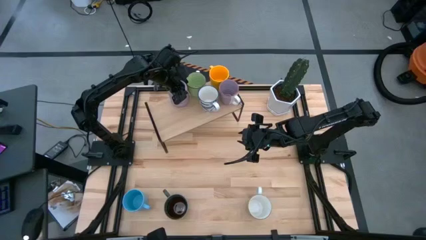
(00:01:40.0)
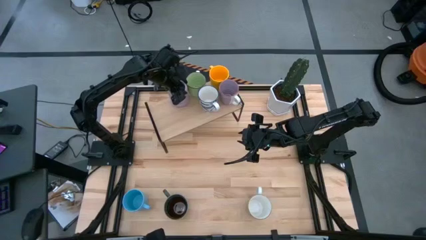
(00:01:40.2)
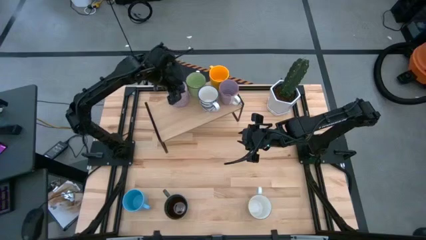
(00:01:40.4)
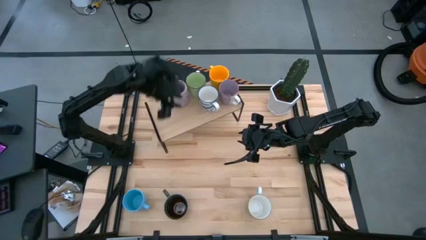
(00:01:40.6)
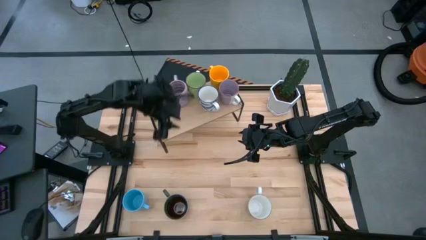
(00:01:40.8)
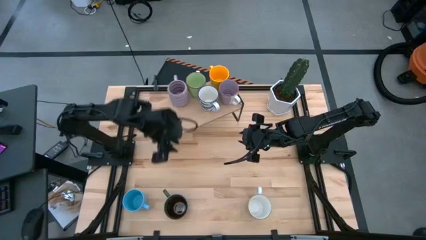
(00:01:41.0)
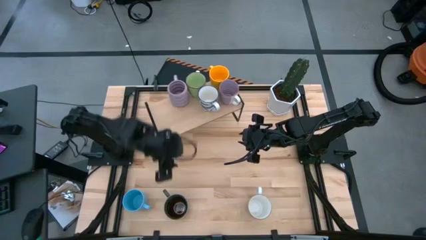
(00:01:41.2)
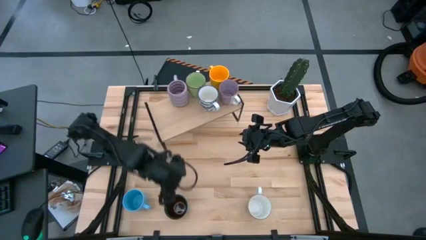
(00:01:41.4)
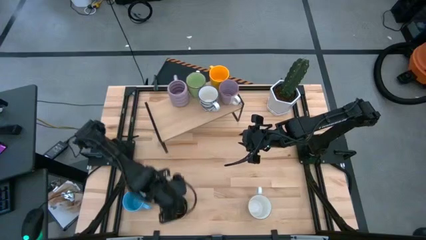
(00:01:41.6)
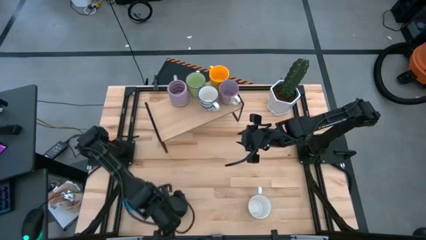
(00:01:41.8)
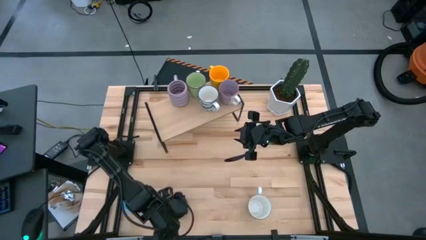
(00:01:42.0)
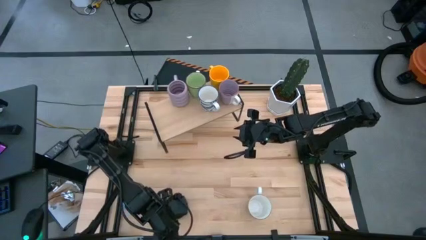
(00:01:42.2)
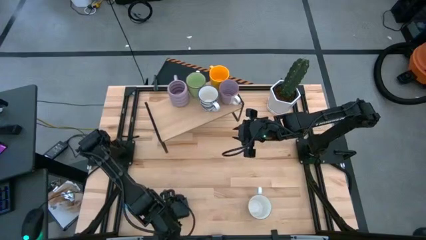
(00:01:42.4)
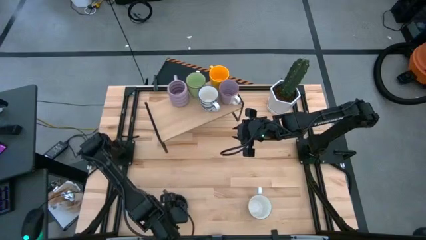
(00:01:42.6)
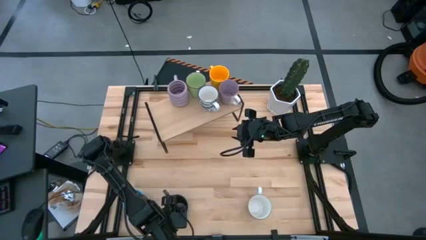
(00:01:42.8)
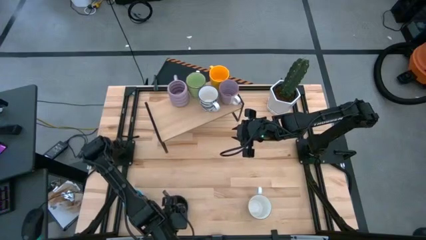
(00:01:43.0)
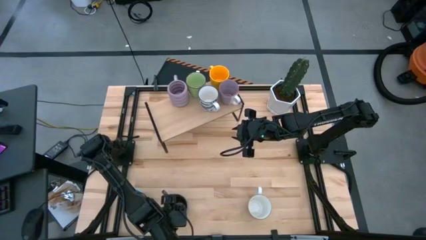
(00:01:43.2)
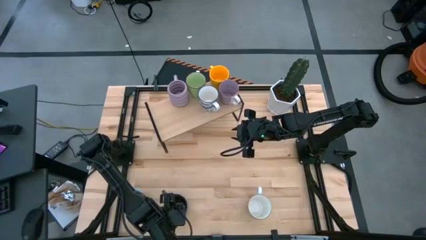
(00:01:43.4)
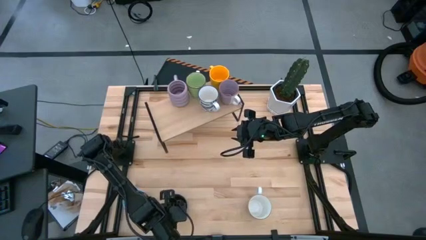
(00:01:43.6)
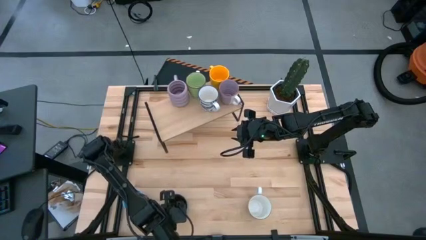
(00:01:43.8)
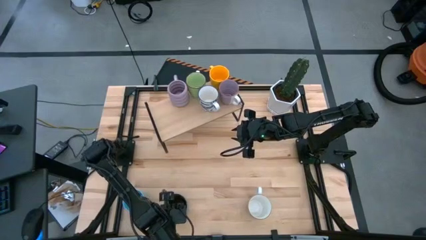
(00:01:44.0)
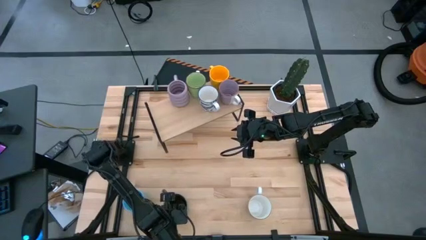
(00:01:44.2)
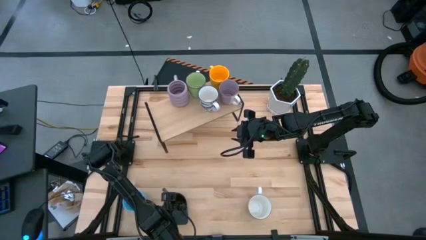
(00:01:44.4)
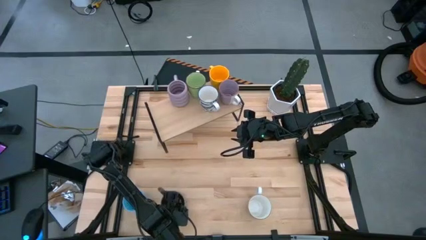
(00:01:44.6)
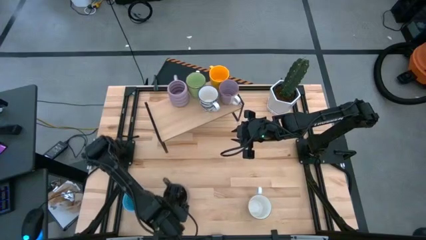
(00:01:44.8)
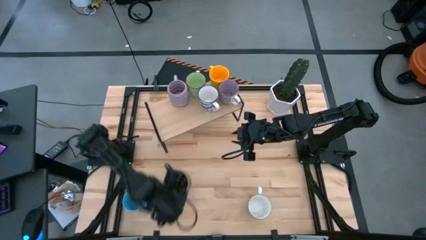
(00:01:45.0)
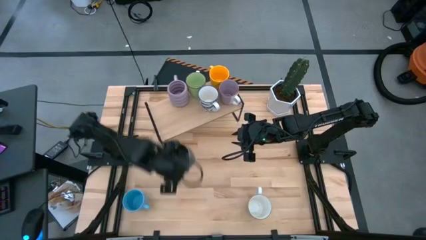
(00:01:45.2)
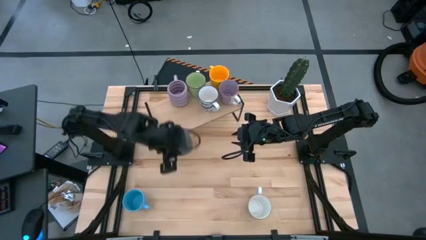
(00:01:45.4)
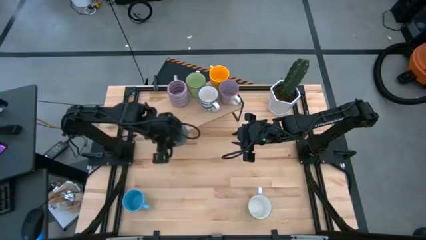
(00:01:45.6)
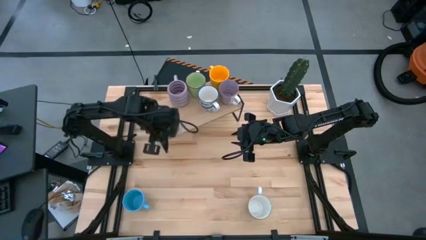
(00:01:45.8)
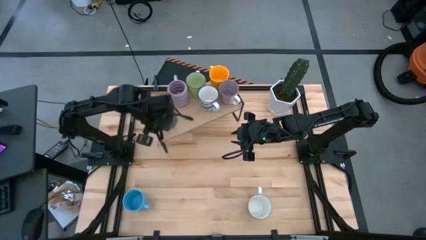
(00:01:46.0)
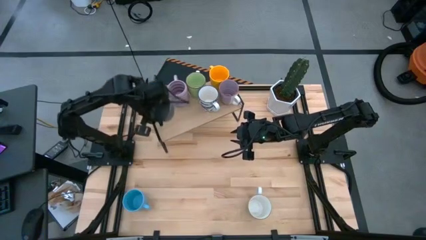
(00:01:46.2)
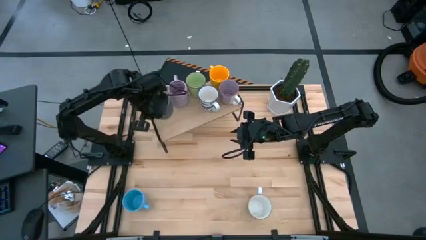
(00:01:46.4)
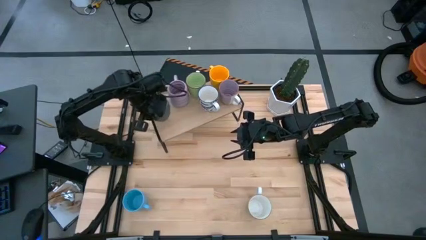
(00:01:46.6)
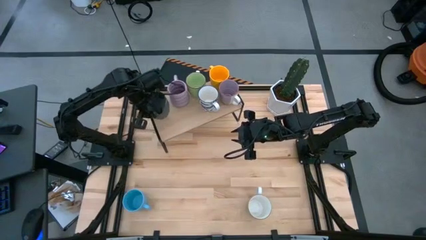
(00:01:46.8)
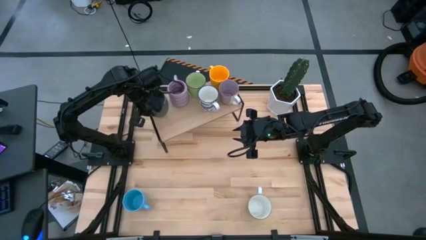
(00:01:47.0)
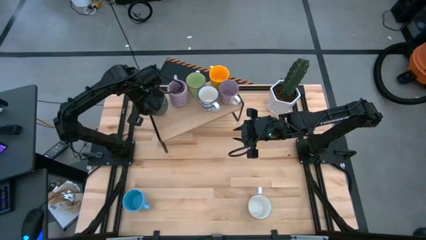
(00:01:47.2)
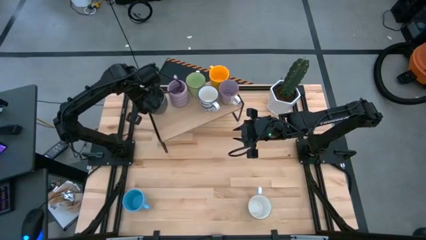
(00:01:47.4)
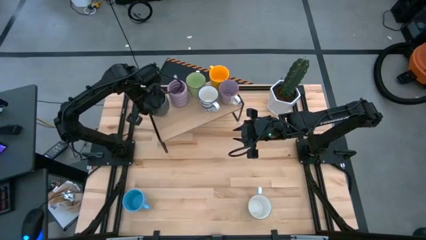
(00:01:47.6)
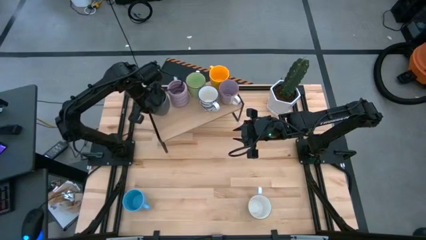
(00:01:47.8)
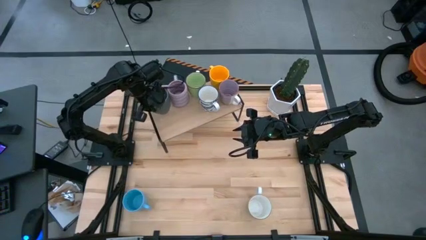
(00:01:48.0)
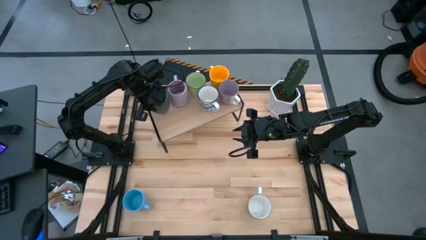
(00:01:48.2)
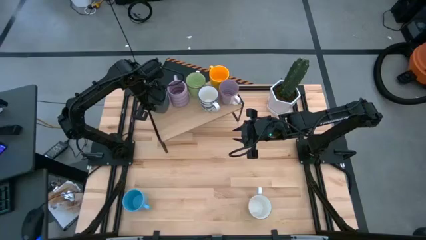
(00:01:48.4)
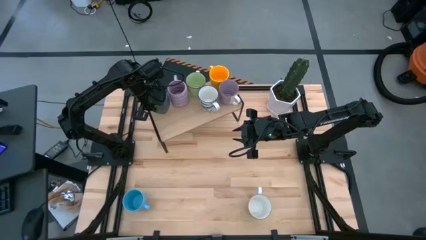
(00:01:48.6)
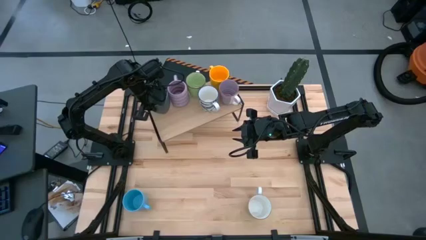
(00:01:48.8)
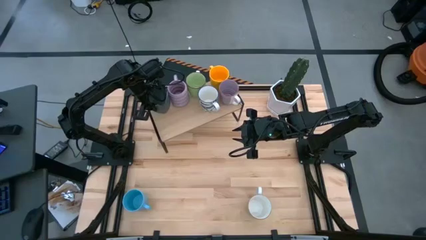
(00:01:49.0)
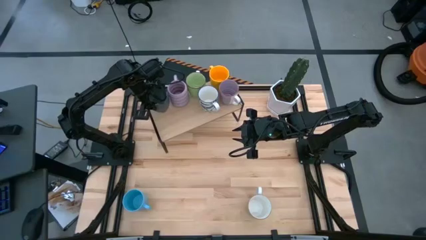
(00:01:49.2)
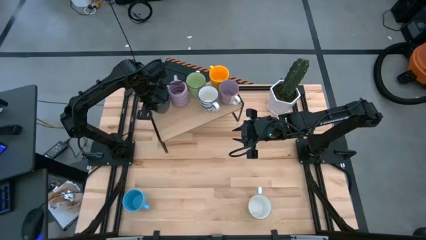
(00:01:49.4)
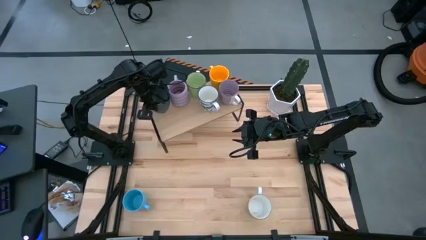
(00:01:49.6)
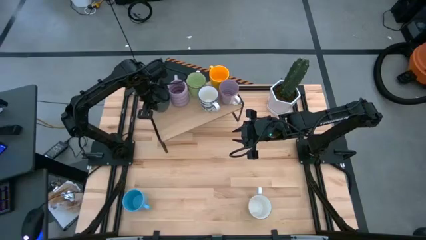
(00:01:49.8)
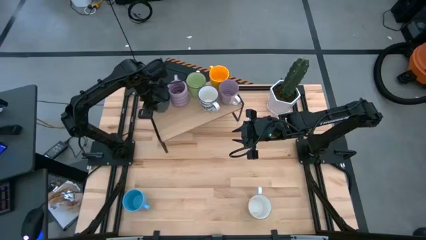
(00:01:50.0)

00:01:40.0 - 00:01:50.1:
Task: Place coffee mugs
Put the dark green mug on the shelf

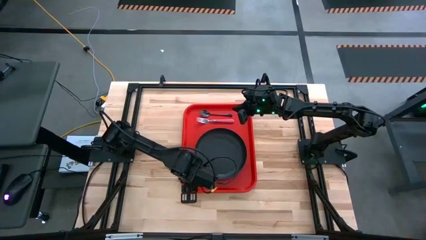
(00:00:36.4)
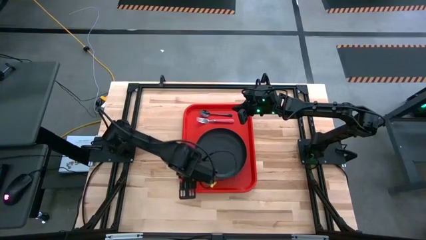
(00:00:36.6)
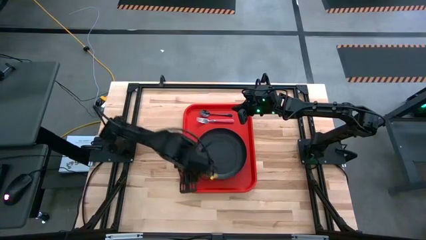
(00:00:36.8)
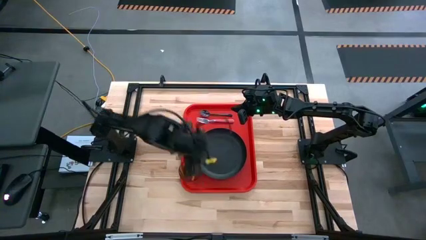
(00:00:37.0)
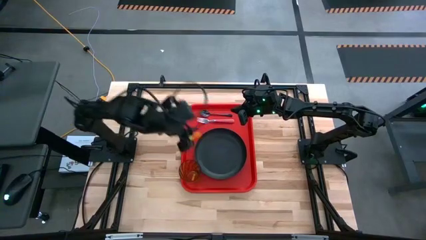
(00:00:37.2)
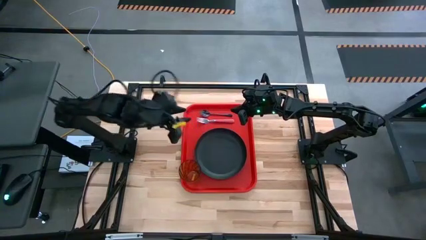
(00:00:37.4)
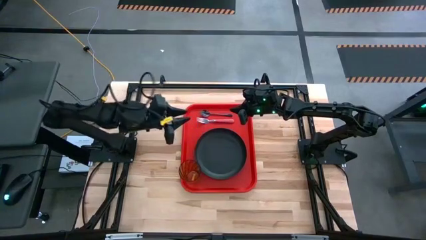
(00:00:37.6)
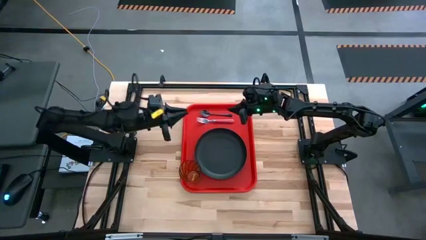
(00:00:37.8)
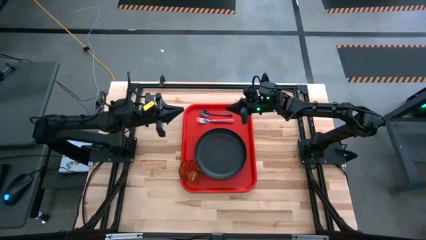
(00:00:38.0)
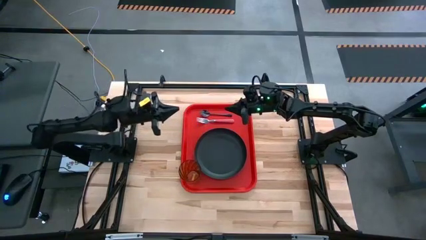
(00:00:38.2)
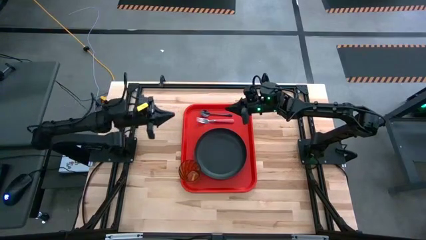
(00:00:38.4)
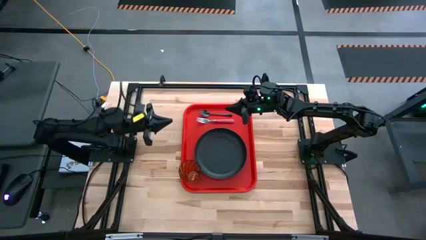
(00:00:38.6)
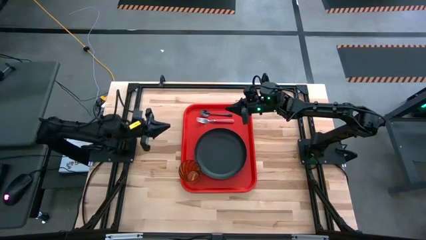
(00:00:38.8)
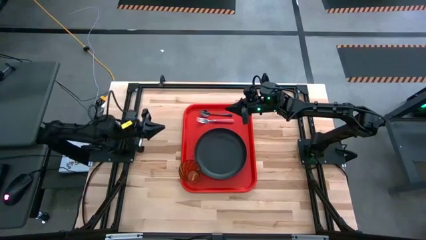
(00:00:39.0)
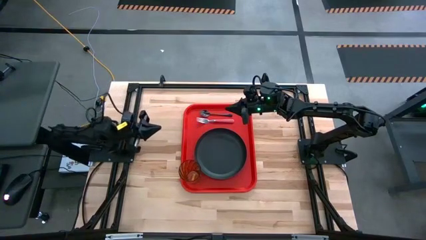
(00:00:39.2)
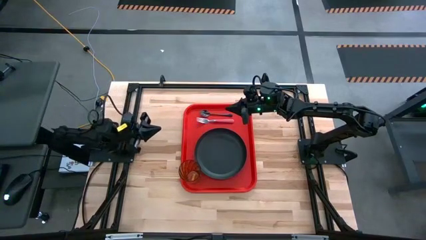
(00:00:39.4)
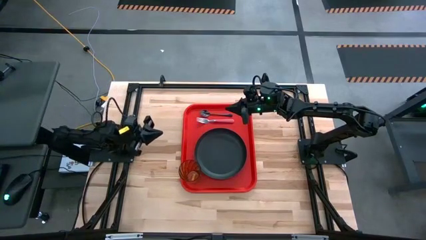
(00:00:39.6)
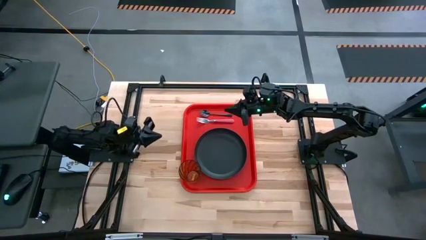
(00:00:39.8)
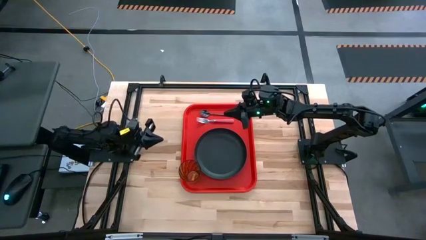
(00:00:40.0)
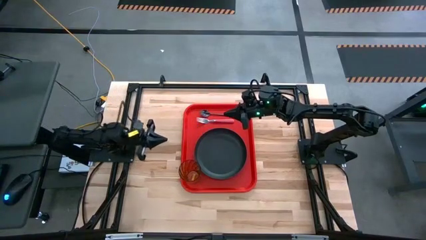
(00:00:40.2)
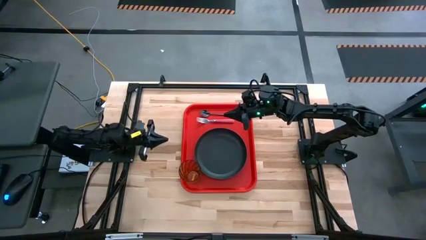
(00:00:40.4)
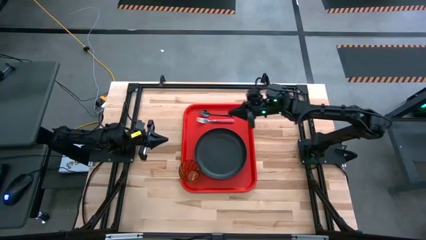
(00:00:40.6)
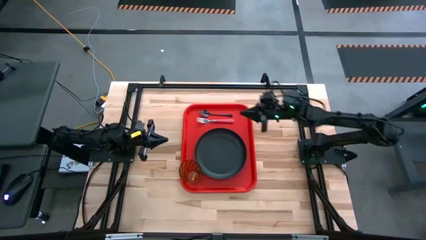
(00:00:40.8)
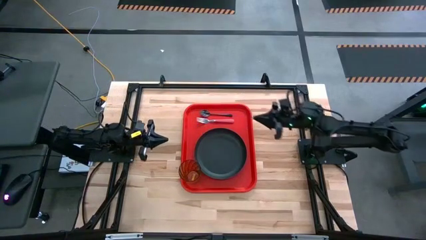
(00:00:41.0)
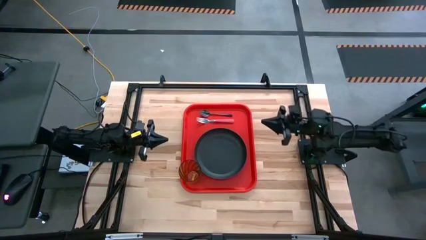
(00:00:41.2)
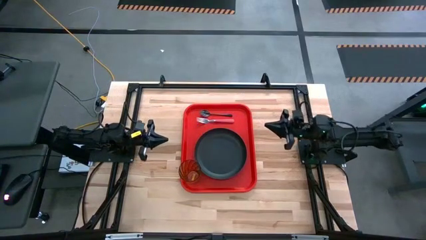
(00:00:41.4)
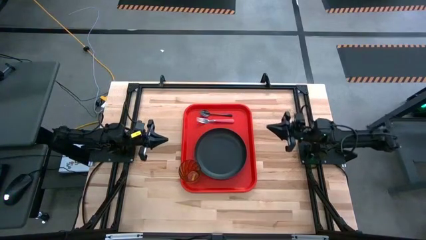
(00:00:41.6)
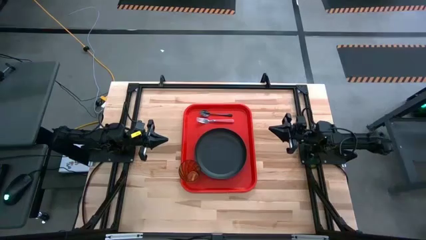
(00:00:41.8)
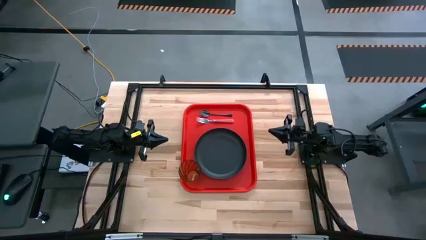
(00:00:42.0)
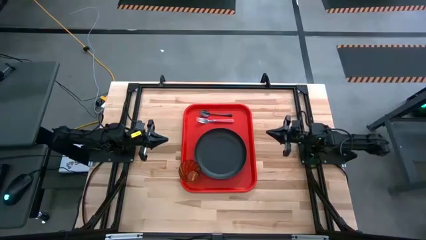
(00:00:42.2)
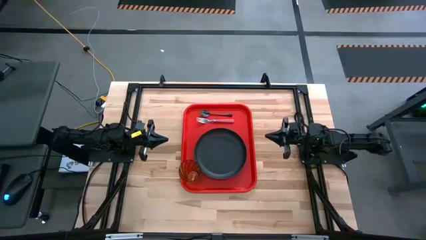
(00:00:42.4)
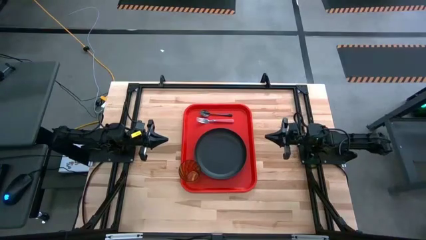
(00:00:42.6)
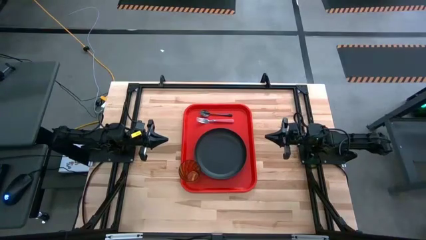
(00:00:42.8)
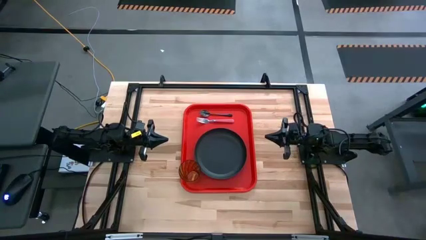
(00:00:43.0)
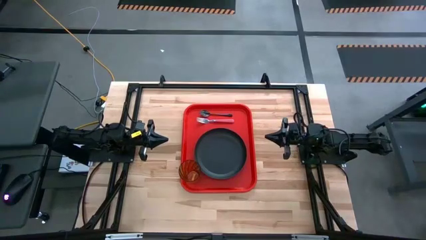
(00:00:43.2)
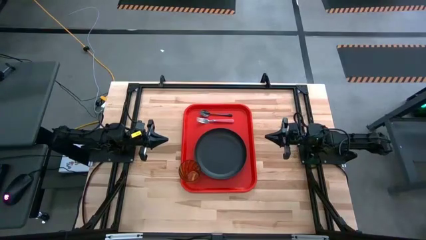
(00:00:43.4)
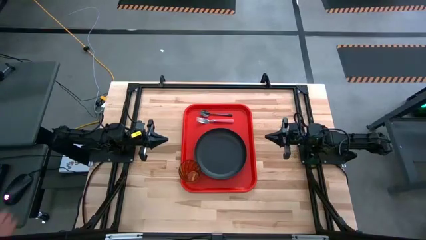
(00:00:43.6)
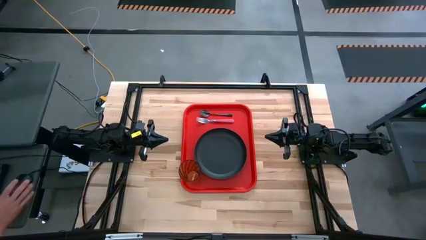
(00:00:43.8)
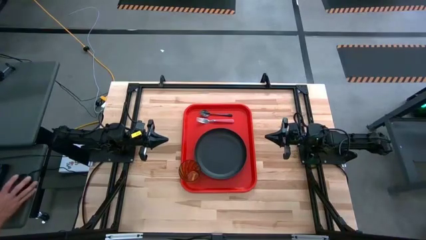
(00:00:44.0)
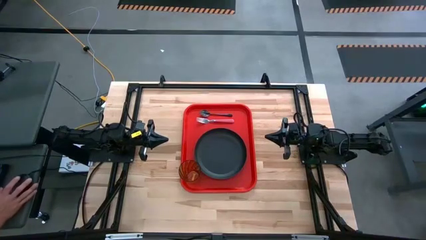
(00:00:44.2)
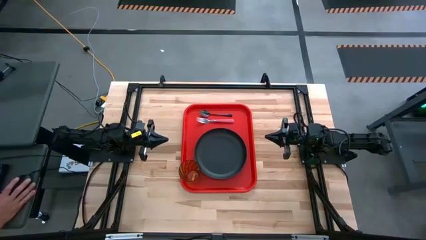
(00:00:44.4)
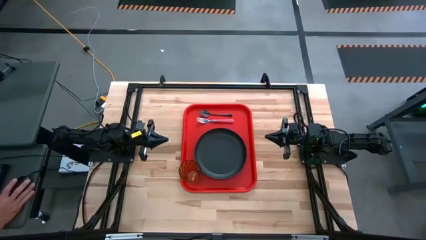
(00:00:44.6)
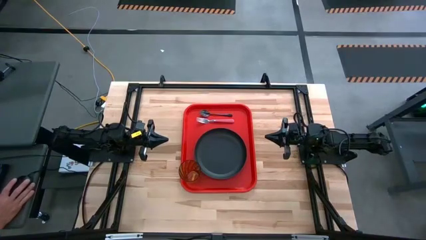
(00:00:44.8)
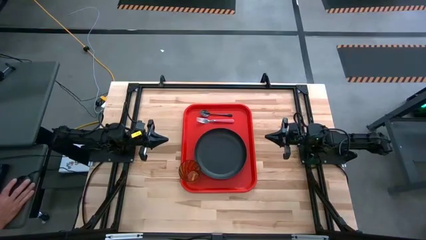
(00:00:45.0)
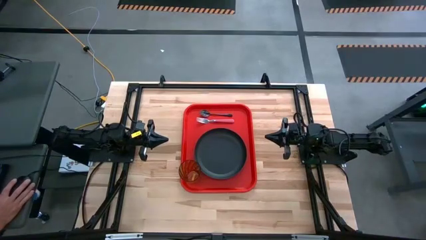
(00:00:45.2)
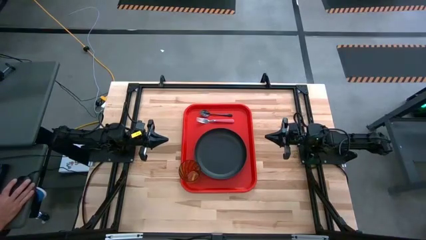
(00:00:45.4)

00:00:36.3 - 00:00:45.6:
Task: Pick and place plate/cup/fork/spoon on tray
Return to Home Position
